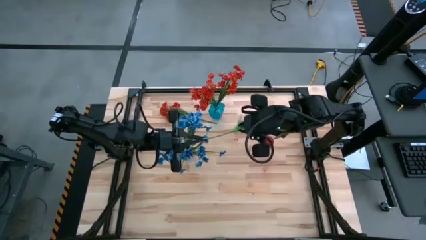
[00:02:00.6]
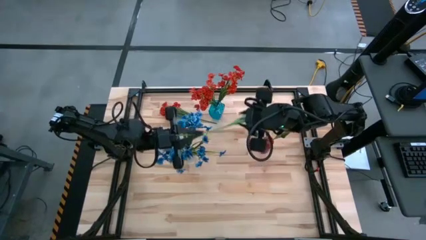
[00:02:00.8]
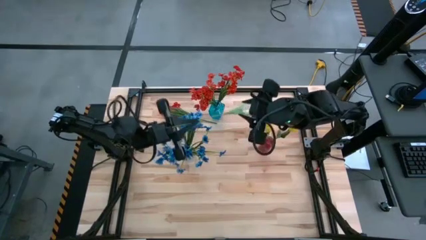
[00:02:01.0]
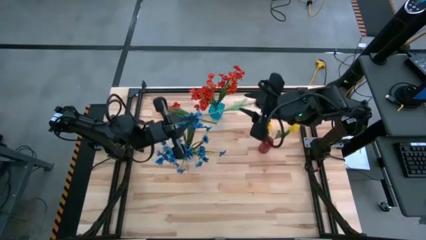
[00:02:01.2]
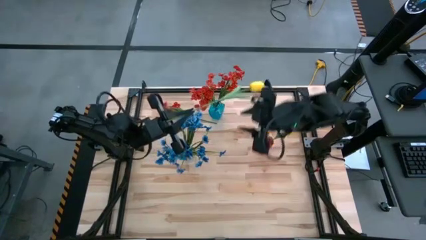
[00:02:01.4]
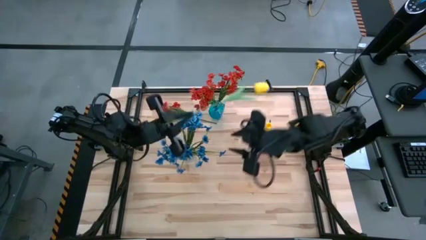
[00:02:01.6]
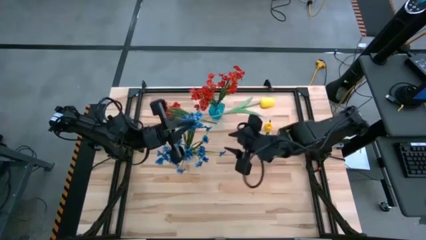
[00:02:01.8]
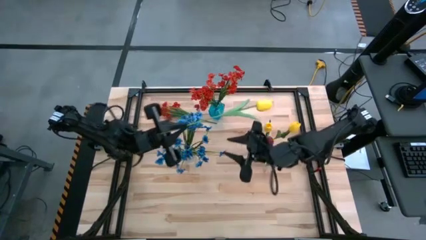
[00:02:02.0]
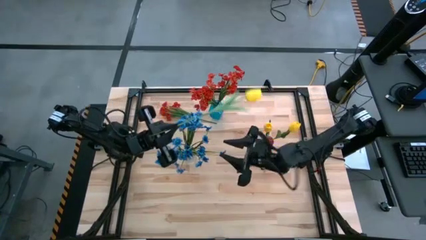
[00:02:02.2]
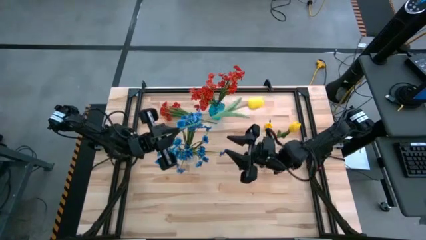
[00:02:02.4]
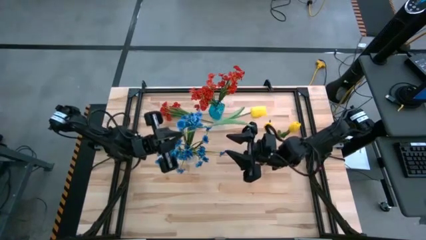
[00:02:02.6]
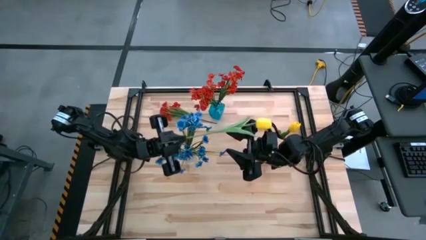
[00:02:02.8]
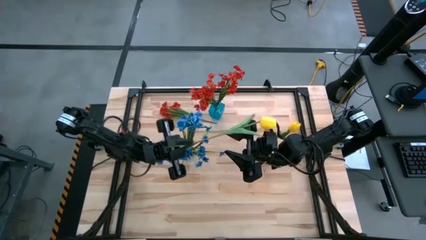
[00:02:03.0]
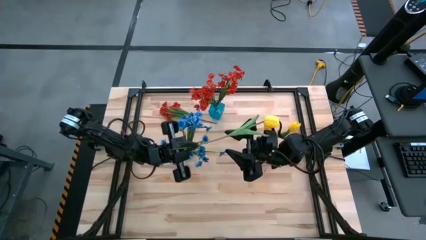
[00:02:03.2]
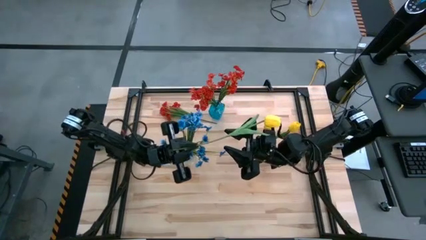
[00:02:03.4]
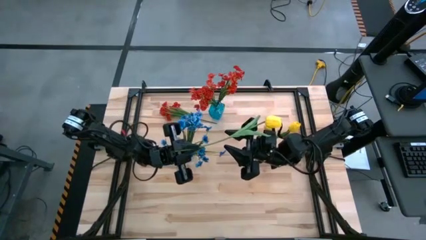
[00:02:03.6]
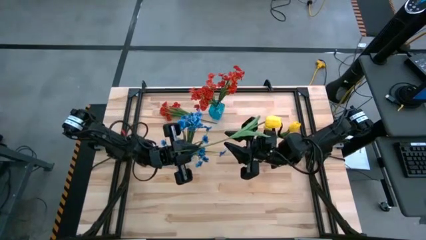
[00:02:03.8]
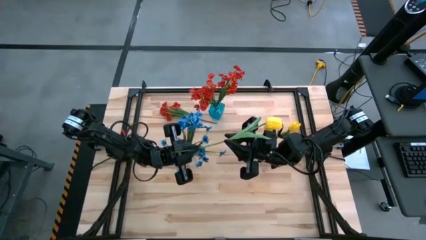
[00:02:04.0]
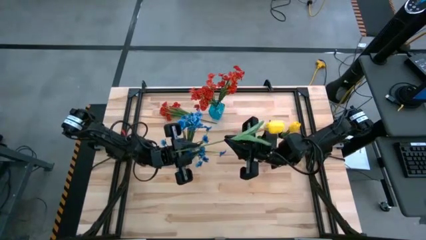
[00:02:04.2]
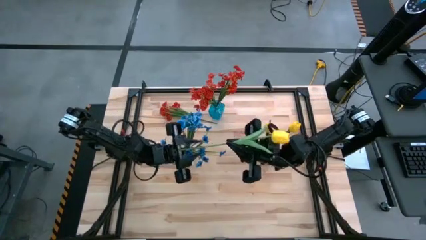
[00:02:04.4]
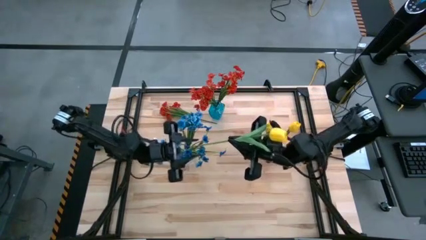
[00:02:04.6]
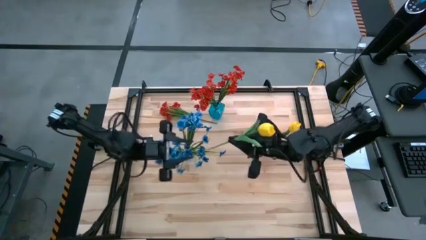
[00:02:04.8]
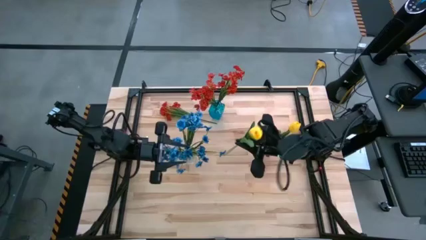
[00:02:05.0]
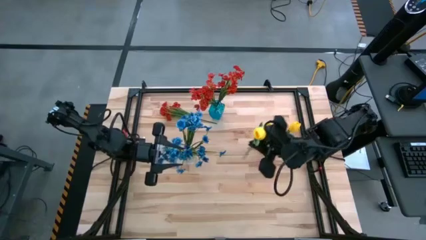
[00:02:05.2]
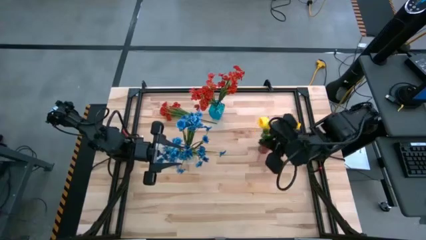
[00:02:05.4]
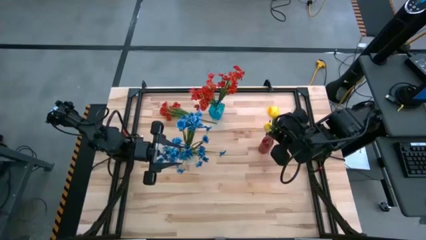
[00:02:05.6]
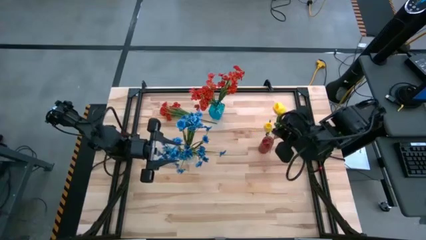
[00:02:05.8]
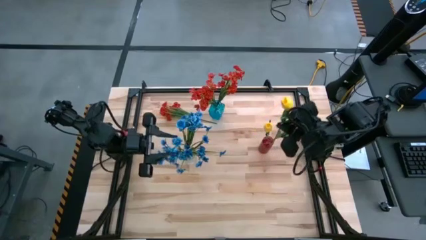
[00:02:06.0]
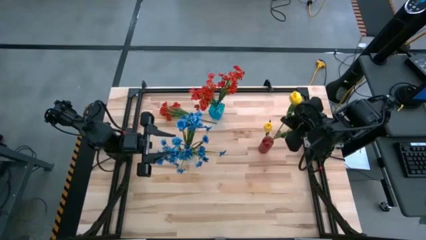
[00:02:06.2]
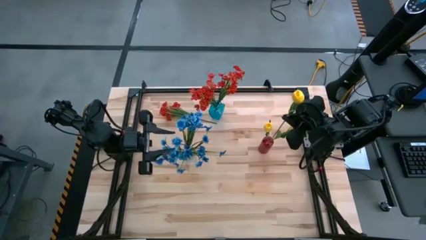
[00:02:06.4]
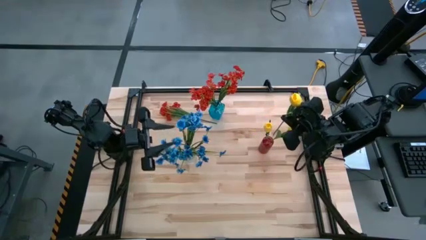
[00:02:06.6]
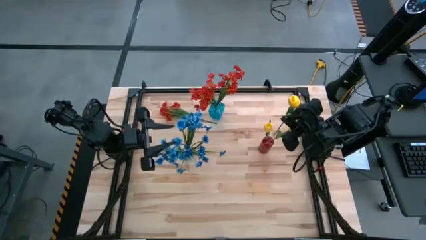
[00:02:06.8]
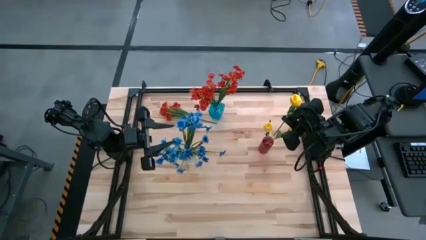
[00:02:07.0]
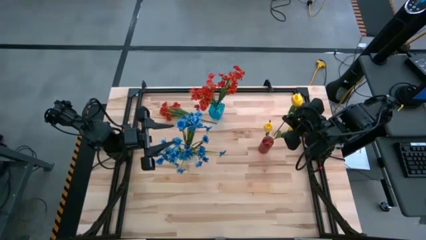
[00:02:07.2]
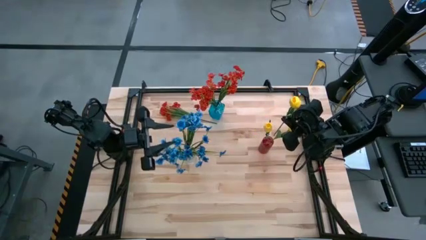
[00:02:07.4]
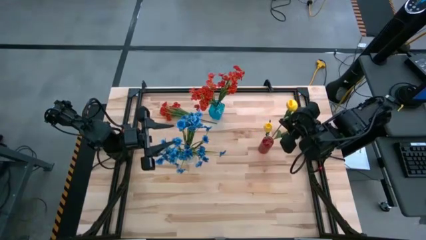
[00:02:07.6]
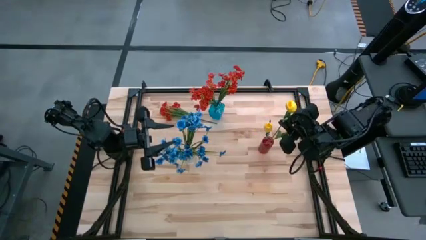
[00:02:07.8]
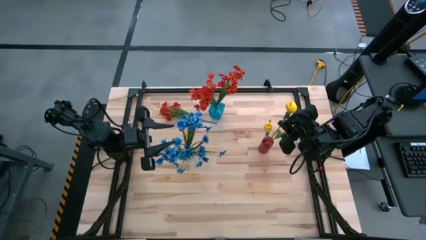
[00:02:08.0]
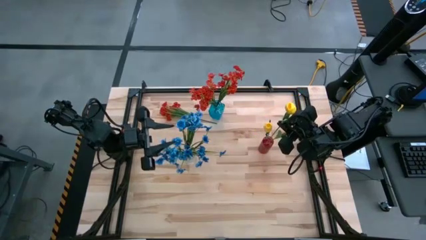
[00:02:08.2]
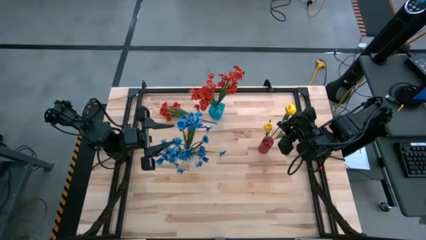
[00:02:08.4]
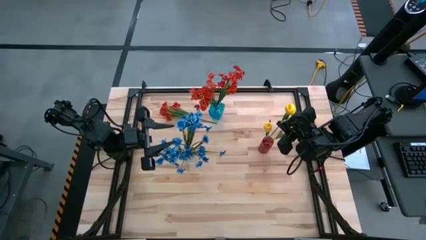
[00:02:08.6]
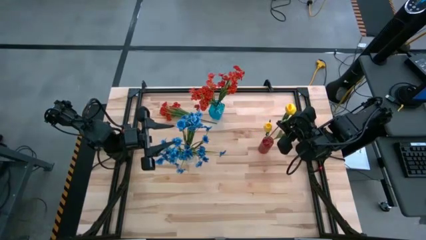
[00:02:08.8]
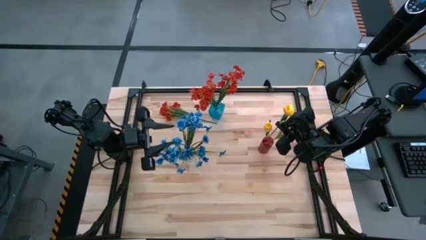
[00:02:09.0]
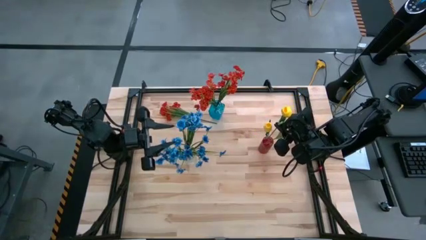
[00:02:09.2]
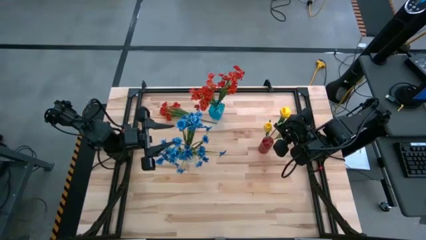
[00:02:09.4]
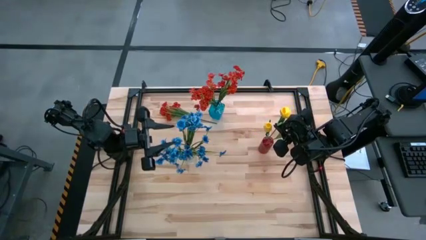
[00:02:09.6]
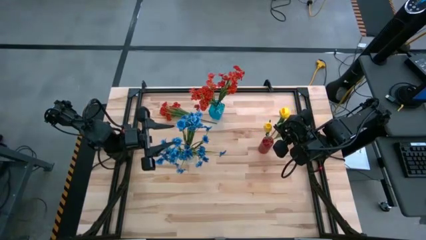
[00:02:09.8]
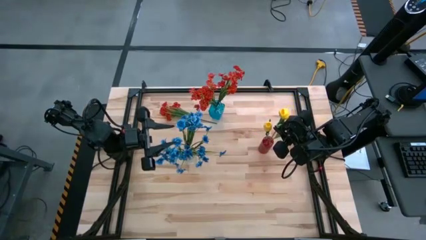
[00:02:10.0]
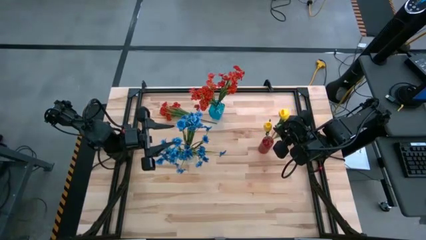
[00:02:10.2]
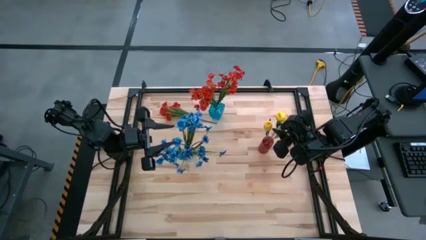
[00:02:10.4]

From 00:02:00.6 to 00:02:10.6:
Task: Sort flowers into vase by color
Put the yellow flower into the red vase
